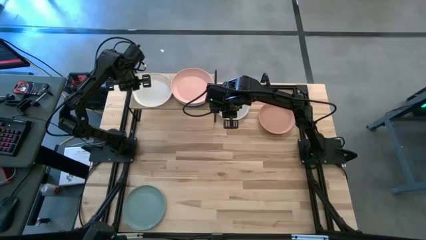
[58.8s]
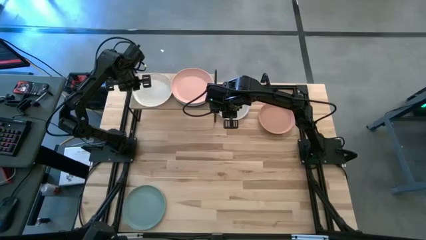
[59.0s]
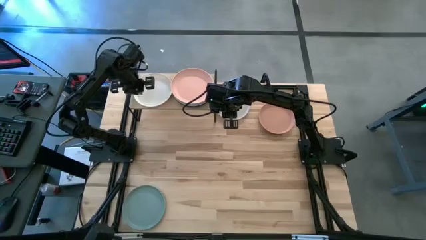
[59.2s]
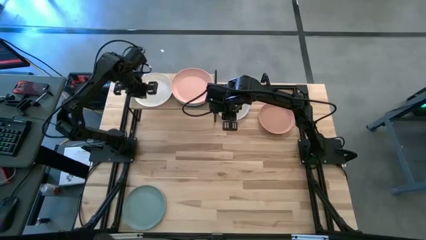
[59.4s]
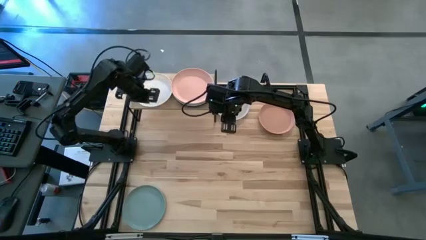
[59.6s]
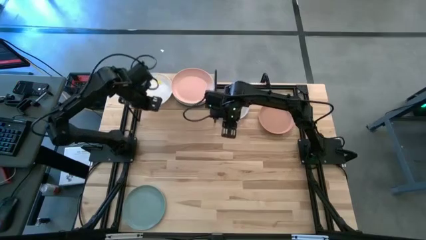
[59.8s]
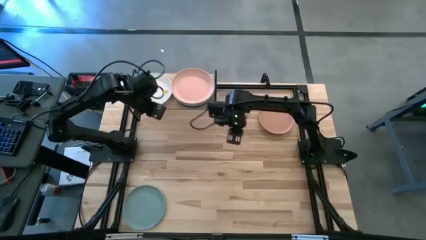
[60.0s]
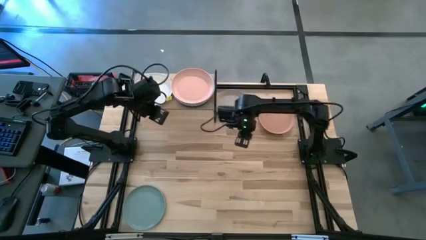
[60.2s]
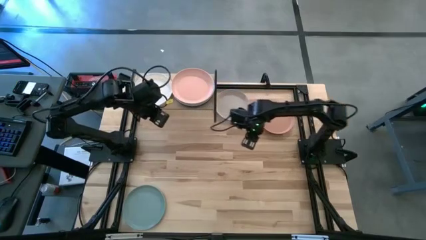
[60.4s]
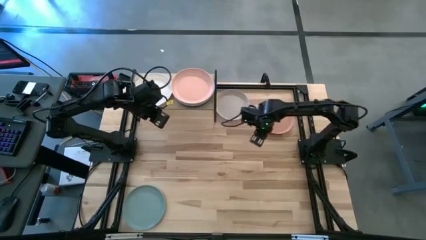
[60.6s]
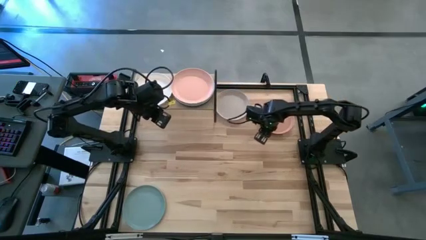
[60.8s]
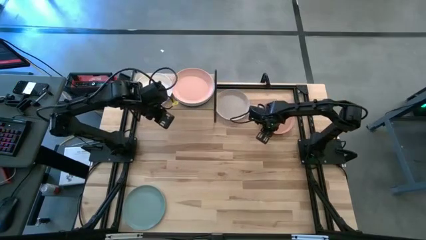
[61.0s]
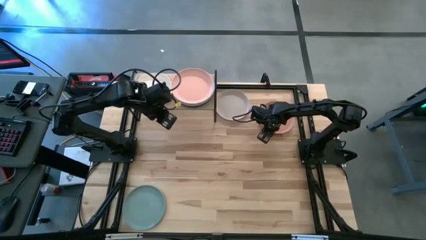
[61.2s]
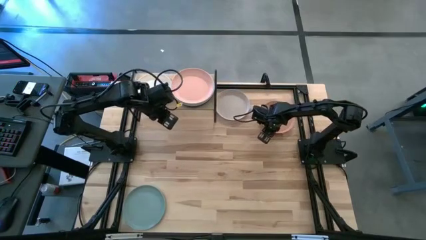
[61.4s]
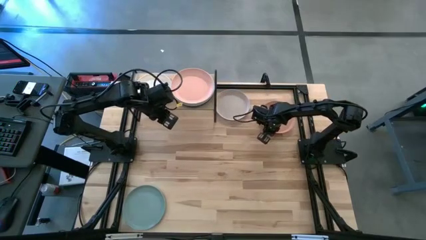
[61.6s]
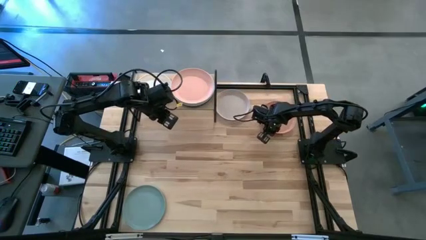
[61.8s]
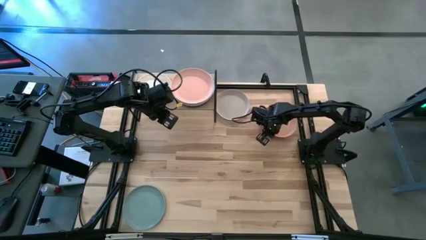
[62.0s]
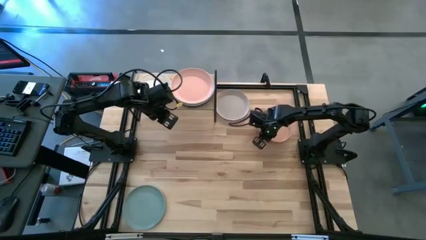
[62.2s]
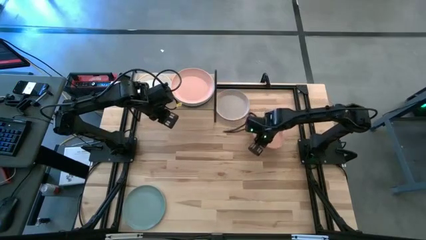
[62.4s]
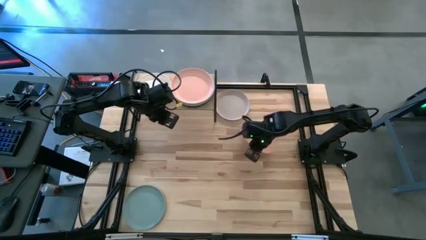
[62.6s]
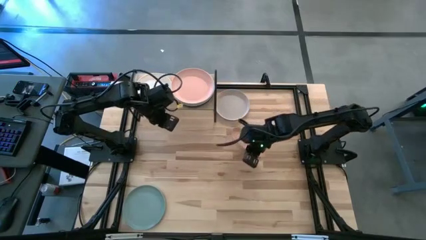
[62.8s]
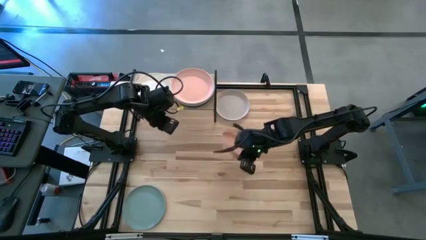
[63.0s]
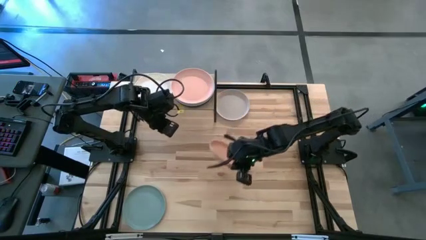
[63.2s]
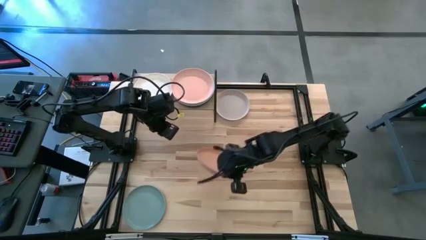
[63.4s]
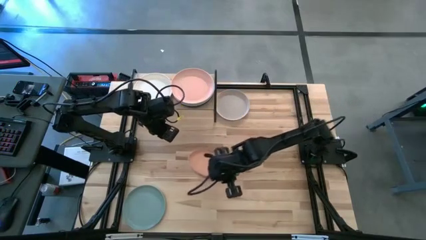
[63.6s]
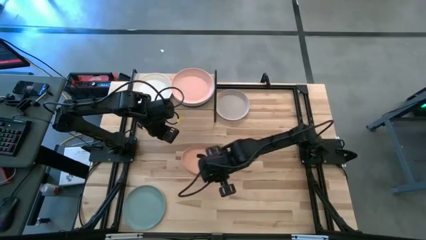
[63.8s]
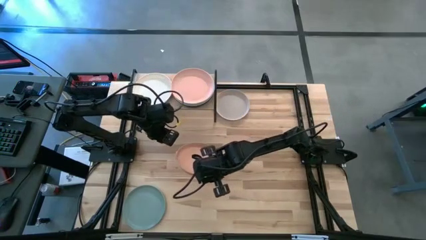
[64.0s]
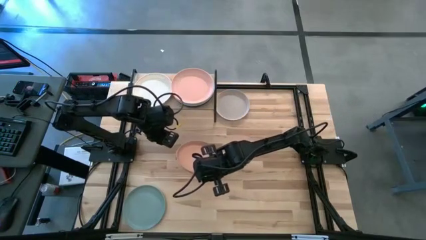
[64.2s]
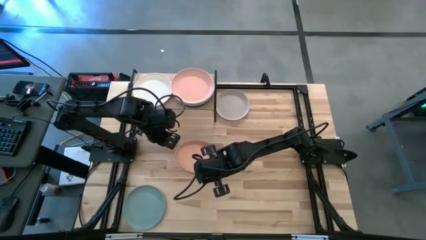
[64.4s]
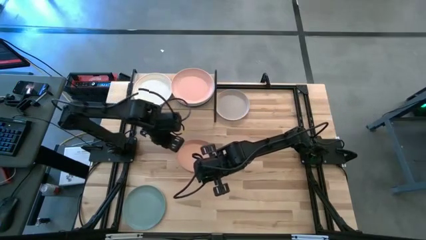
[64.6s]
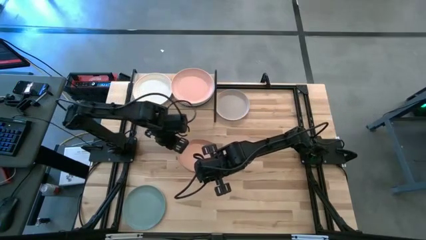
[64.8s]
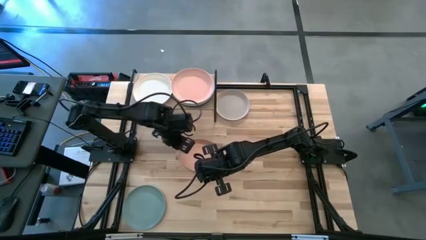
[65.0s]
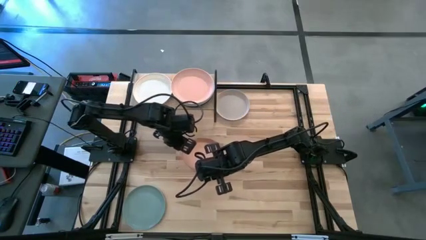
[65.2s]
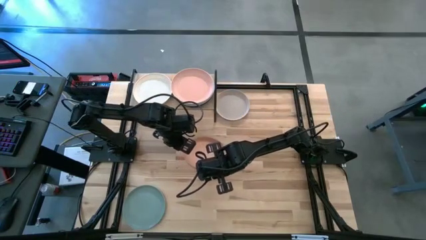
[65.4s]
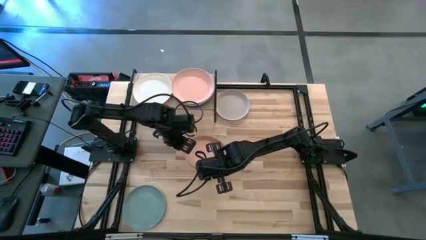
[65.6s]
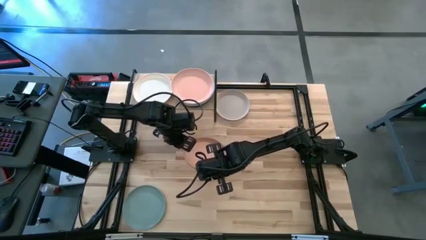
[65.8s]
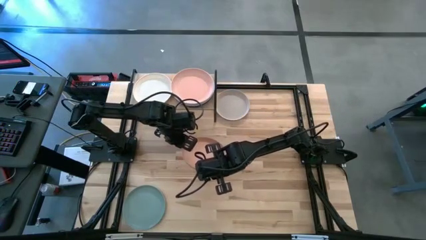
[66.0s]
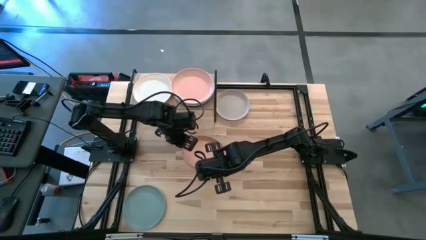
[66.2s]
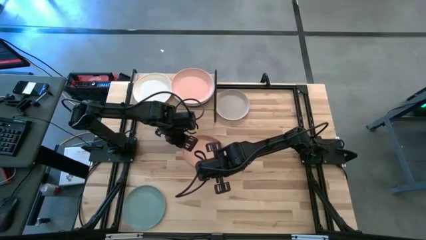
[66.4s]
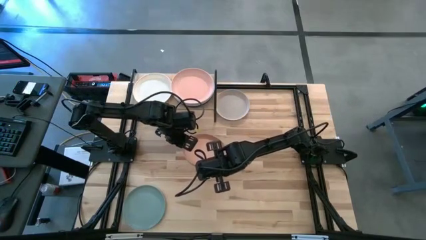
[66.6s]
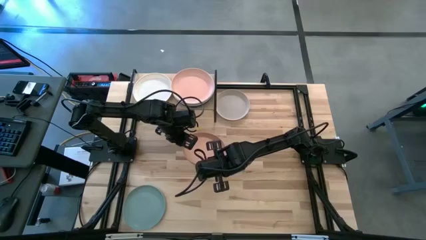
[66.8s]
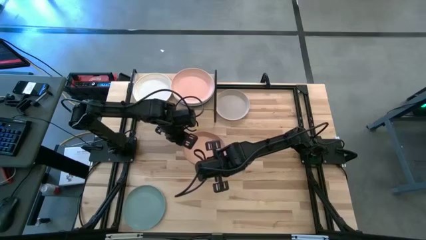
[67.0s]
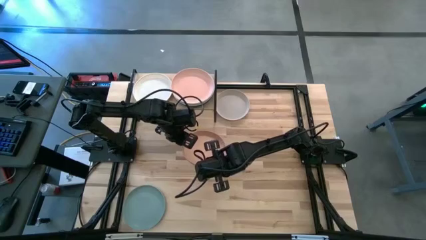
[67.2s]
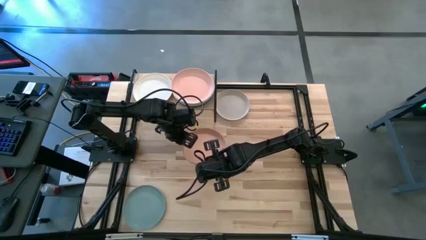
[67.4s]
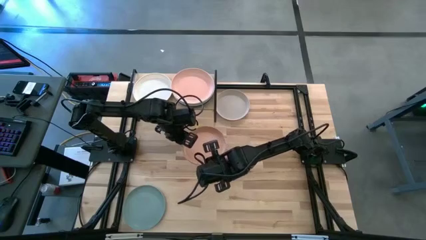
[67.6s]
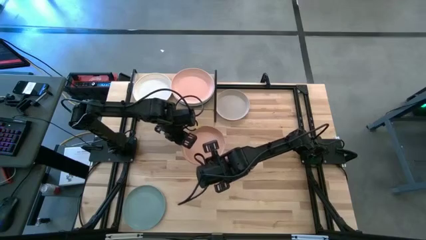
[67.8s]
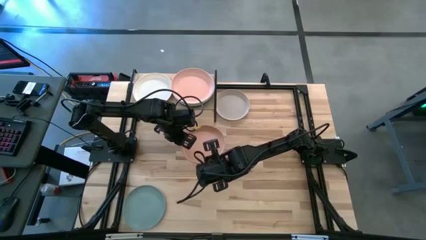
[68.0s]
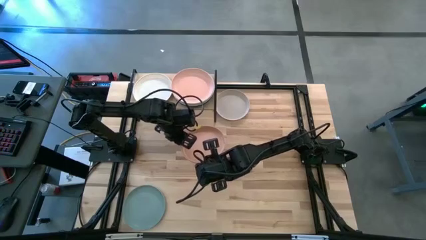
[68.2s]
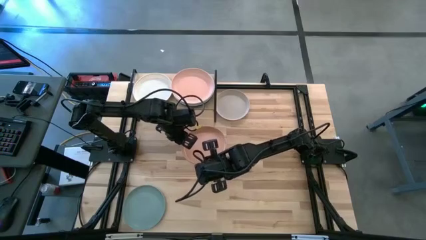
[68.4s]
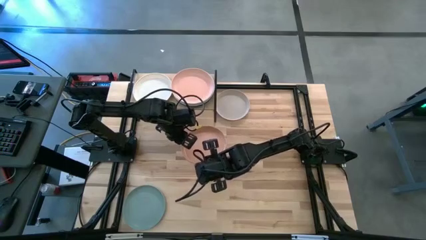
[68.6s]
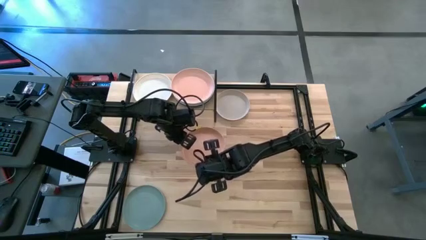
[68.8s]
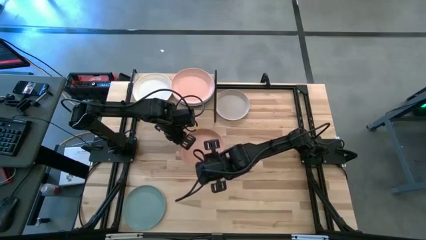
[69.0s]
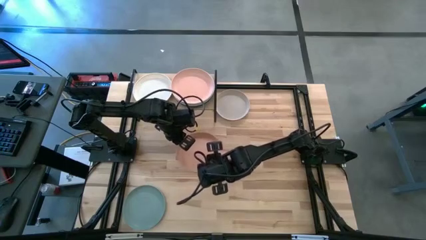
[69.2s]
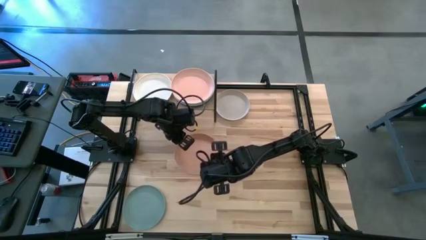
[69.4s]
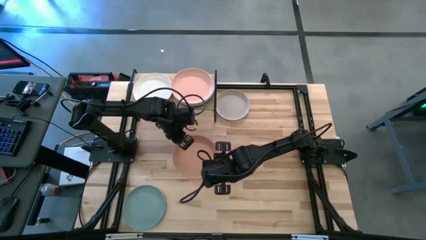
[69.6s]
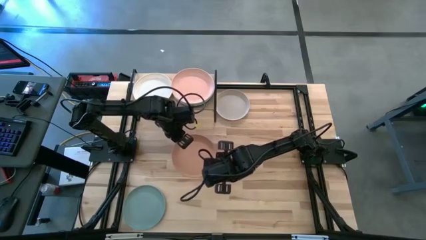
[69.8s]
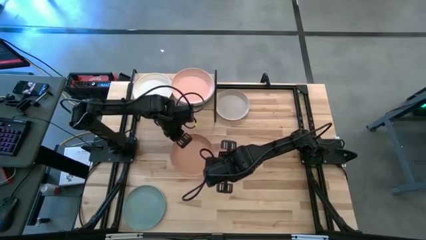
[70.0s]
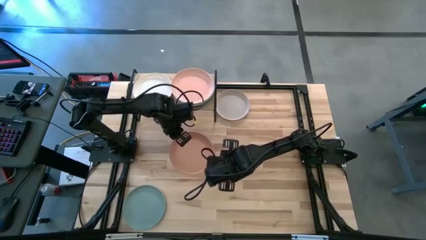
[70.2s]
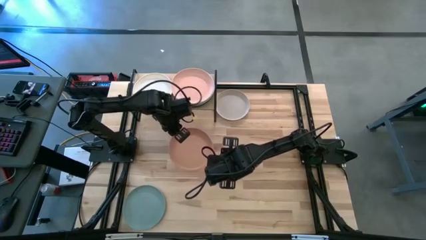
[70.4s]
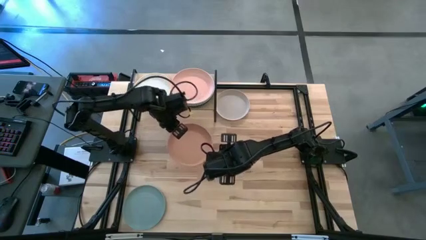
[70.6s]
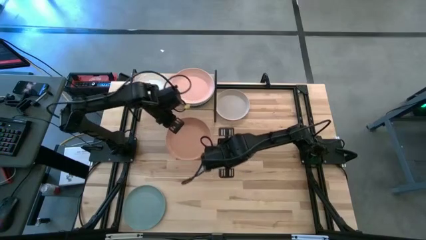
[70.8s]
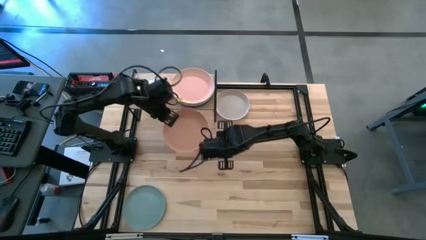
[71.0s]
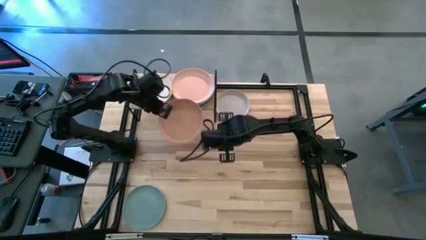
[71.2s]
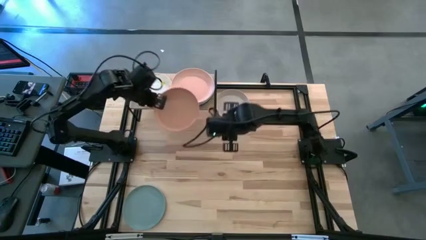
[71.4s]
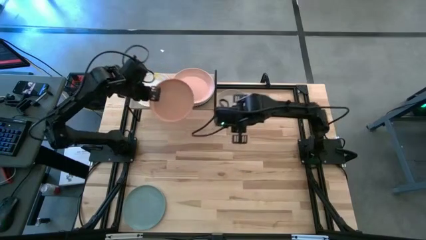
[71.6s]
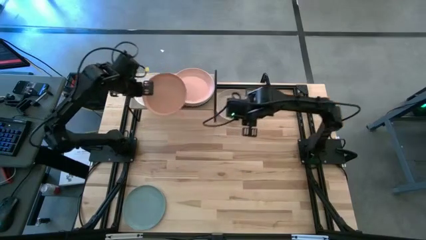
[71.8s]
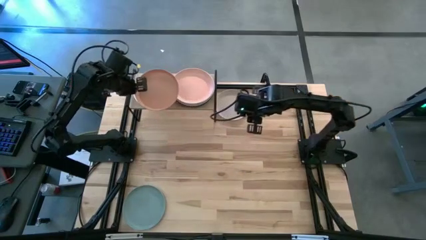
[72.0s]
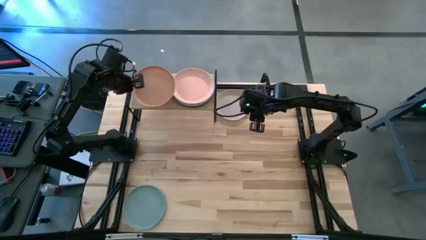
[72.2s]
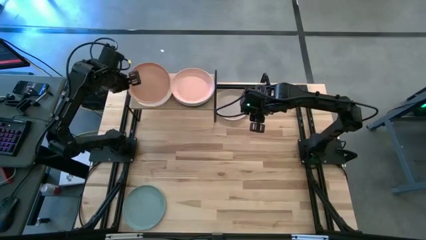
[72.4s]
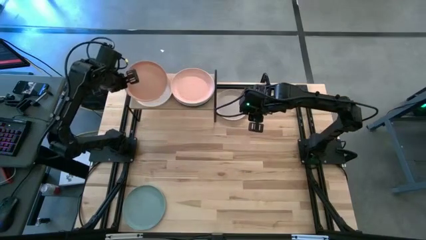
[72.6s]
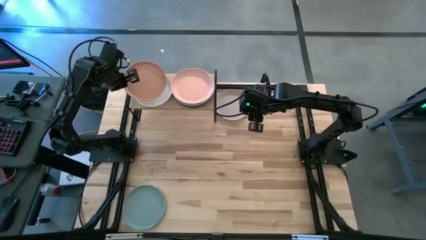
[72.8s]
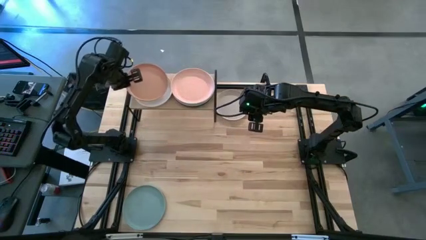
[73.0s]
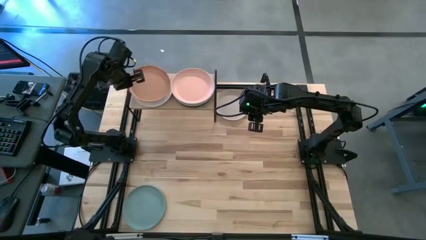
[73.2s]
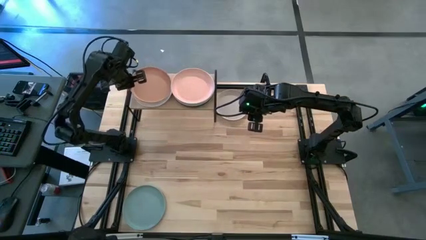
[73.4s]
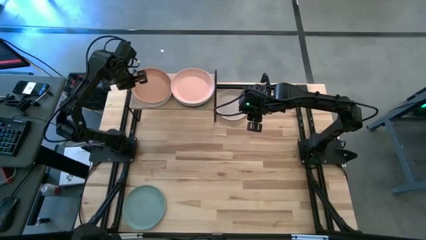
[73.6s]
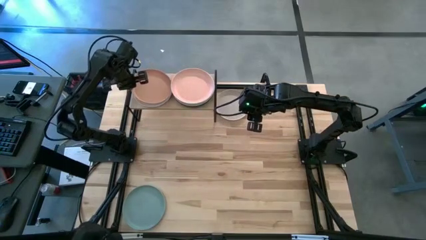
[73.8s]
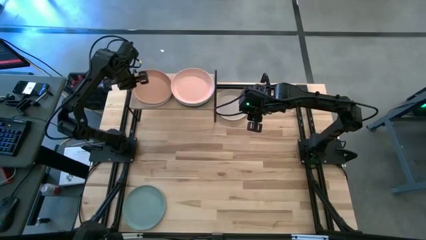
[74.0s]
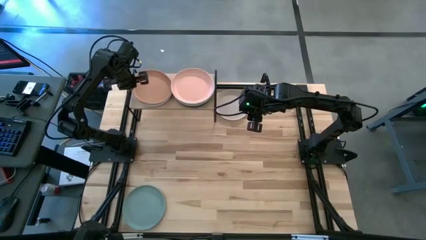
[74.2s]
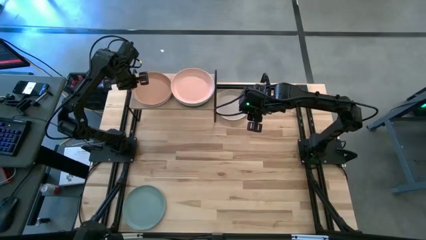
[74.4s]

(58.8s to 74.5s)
Task: Place and stack plates onto a shelf
Stack the pink plate on top of the white plate on the shelf

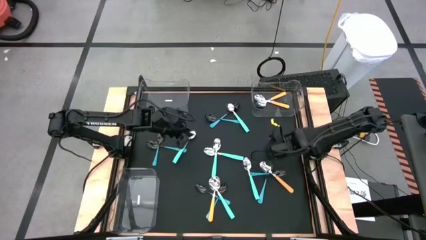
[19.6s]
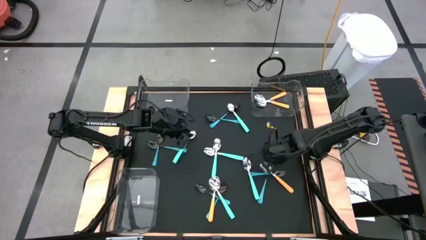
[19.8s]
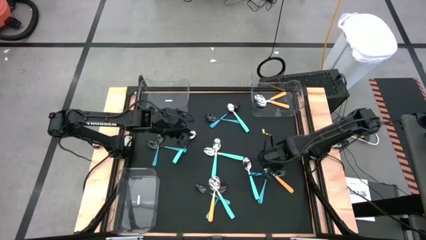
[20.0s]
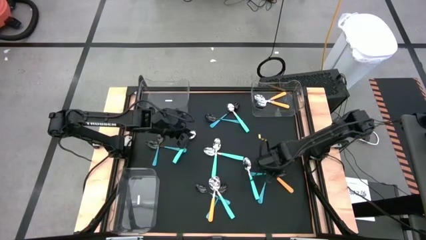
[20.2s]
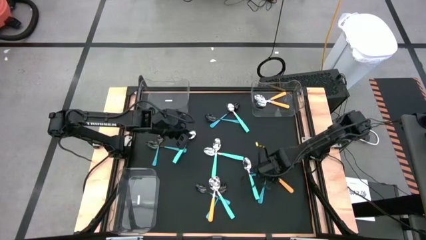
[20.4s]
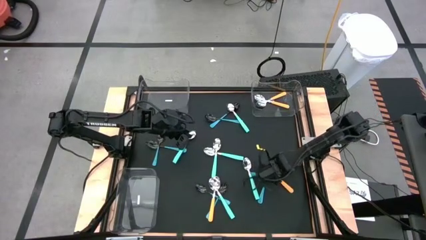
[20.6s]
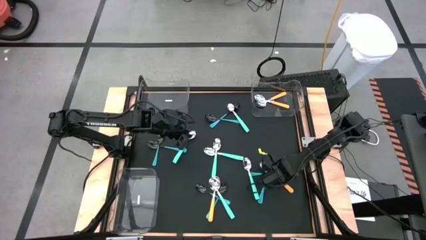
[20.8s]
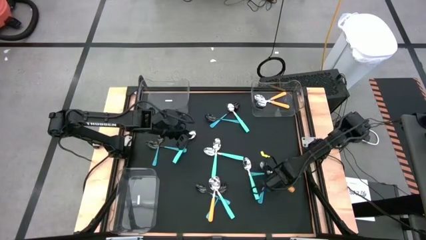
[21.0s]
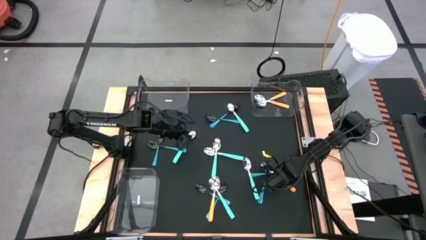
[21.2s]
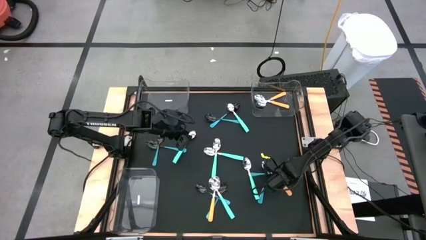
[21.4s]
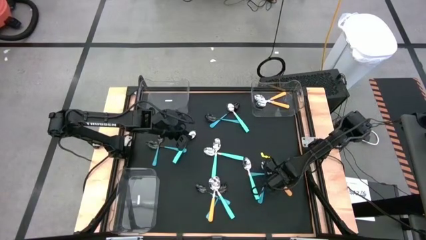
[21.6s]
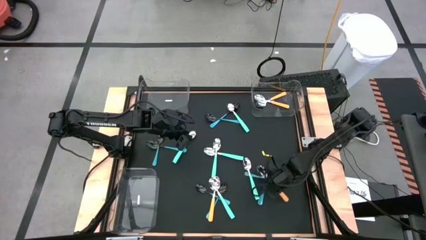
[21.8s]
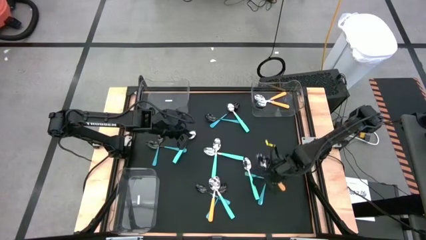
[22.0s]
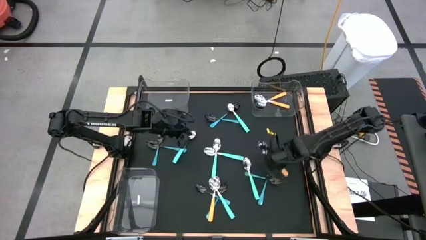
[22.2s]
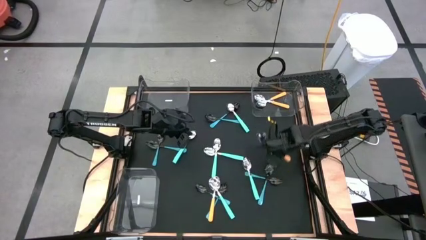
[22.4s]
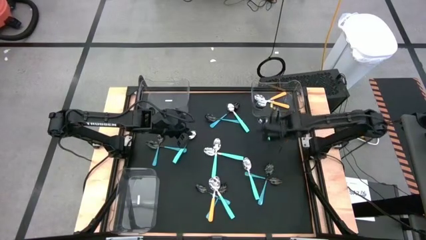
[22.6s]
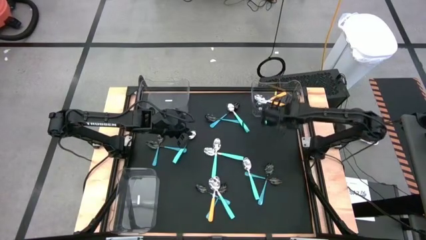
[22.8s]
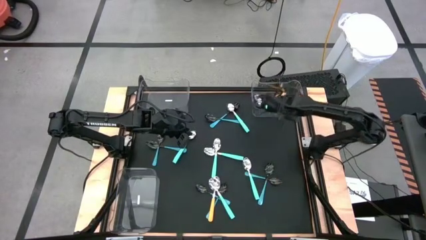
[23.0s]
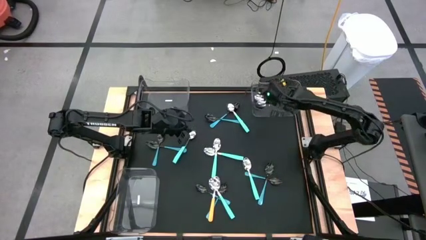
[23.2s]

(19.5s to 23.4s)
Task: Sort silverware by color (type)
Put the yellow spoon into the top right transparent bin
